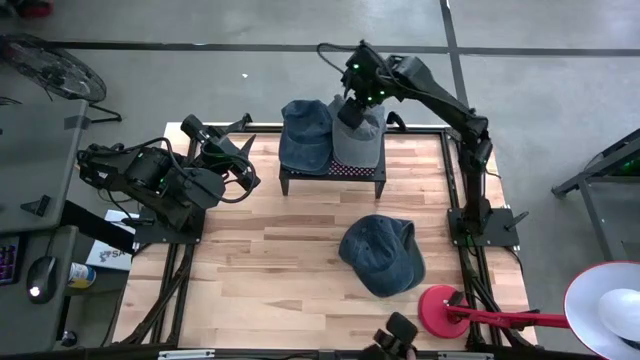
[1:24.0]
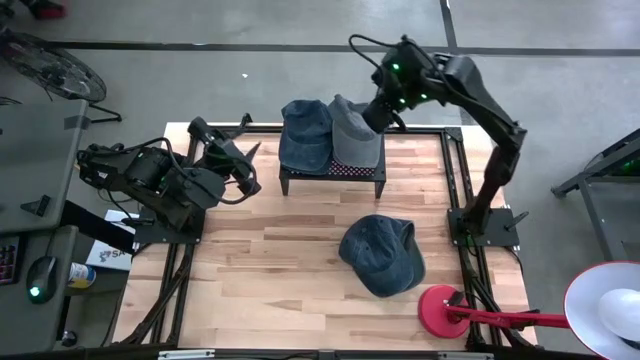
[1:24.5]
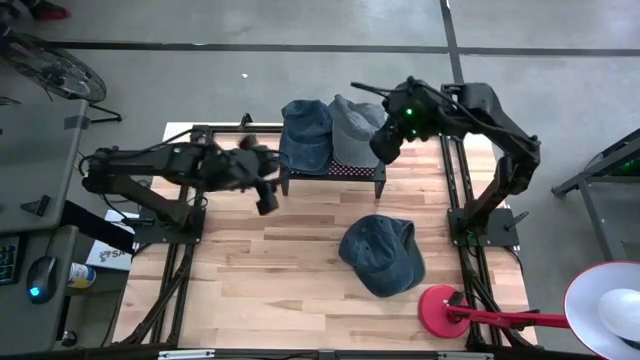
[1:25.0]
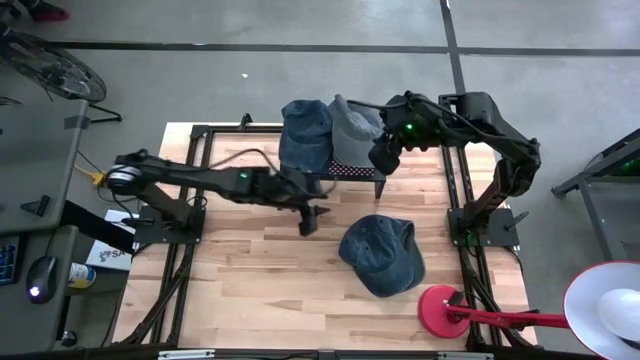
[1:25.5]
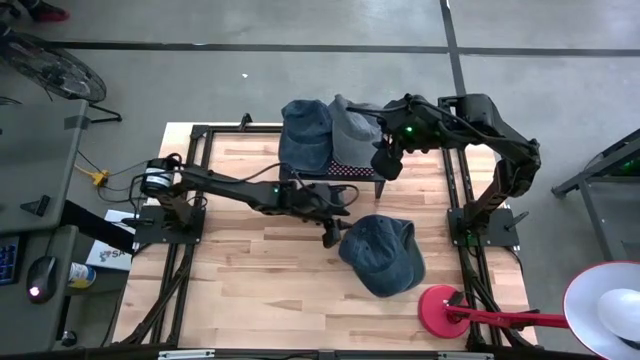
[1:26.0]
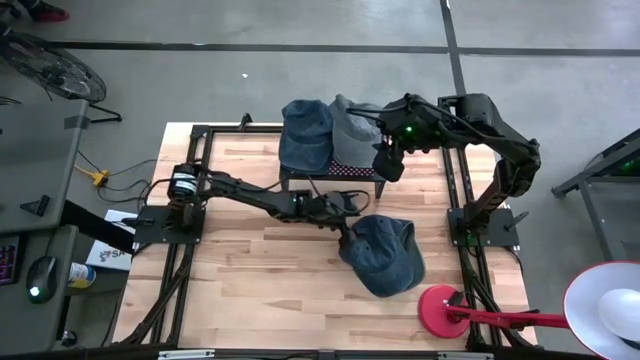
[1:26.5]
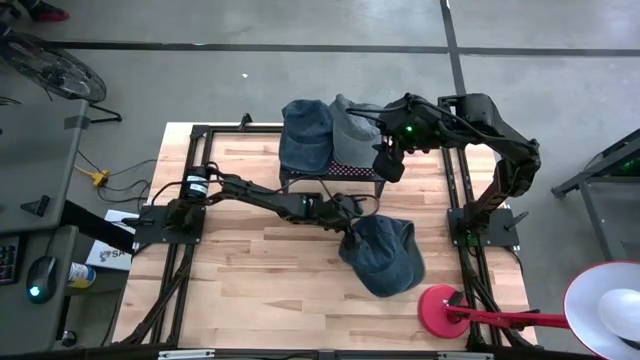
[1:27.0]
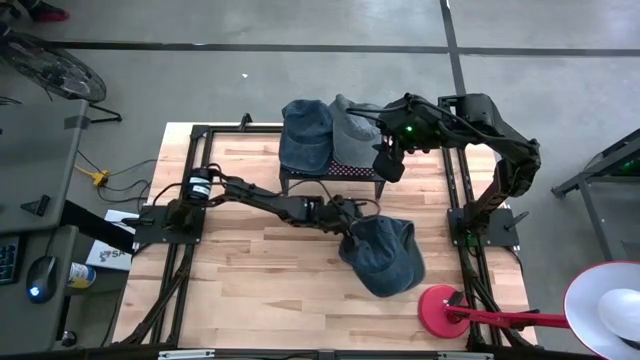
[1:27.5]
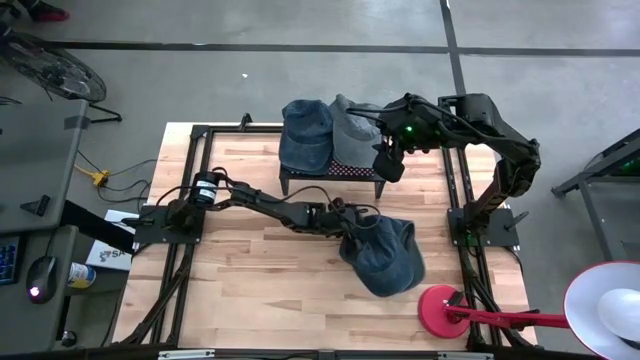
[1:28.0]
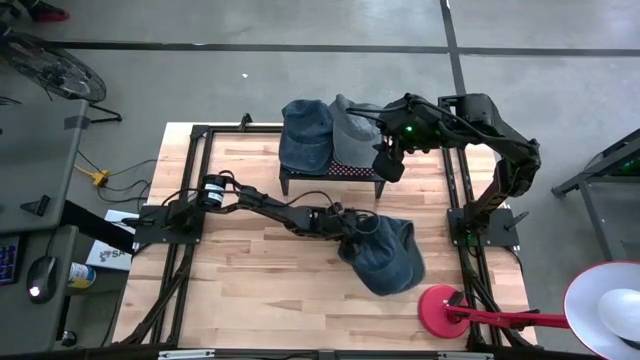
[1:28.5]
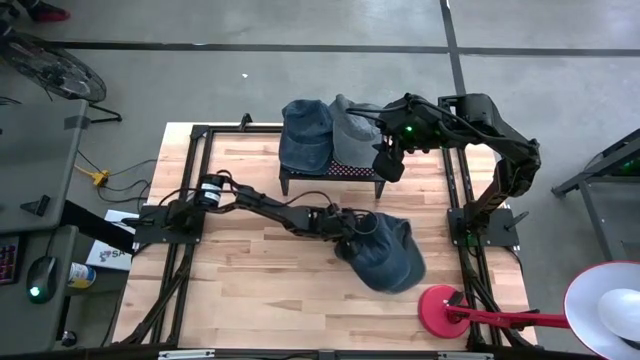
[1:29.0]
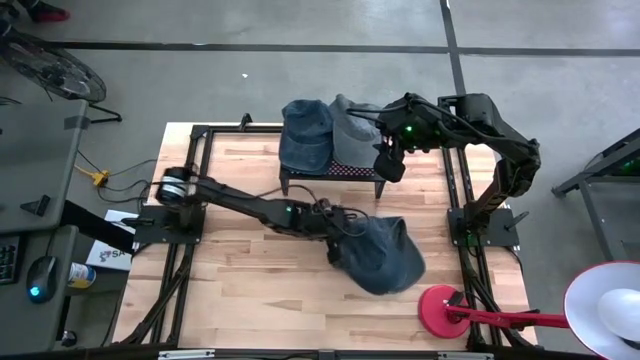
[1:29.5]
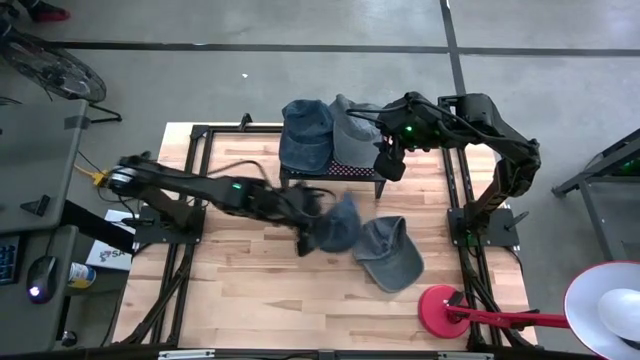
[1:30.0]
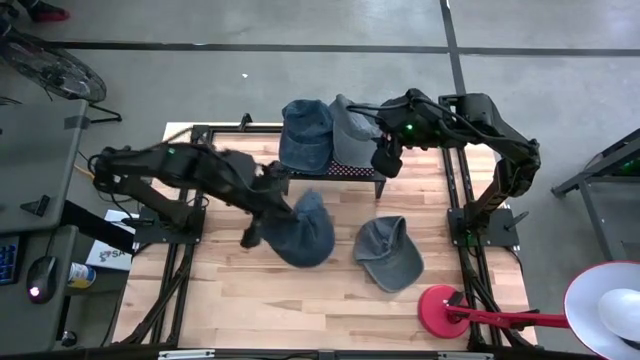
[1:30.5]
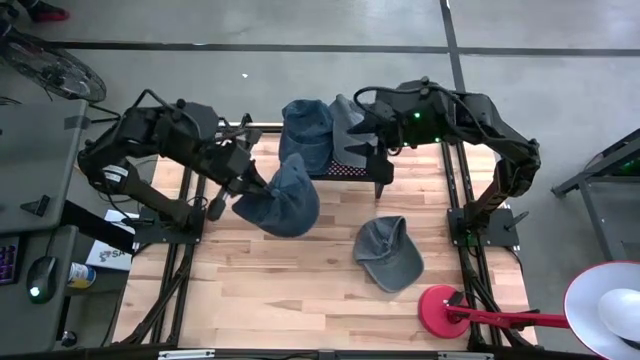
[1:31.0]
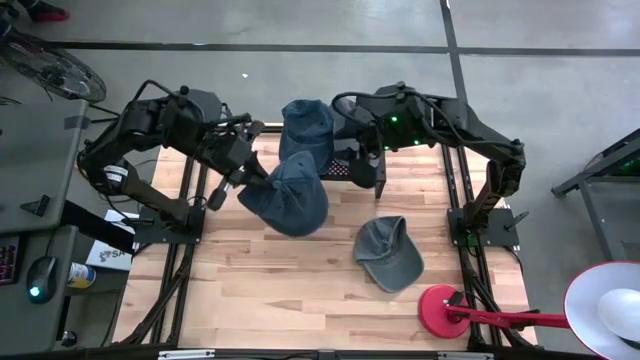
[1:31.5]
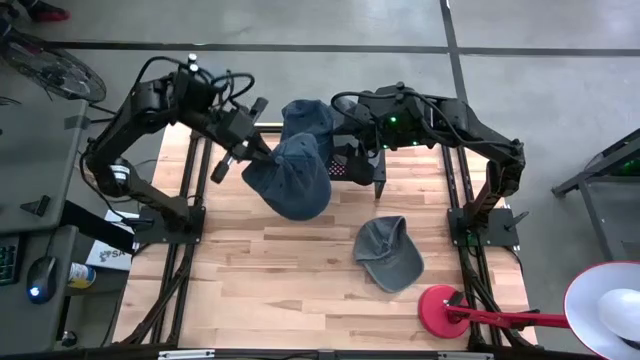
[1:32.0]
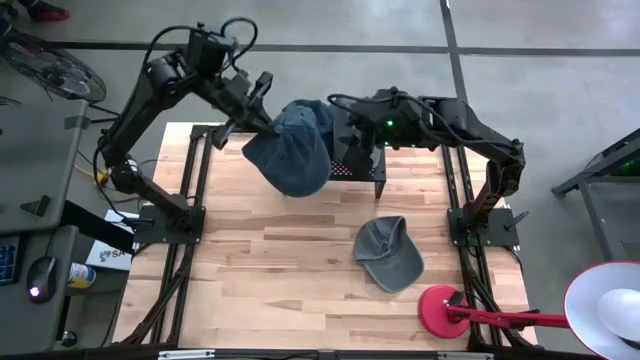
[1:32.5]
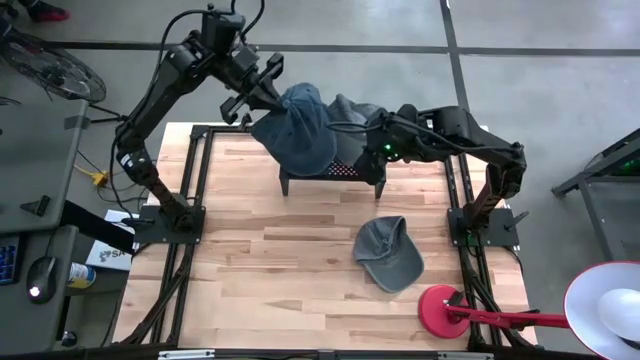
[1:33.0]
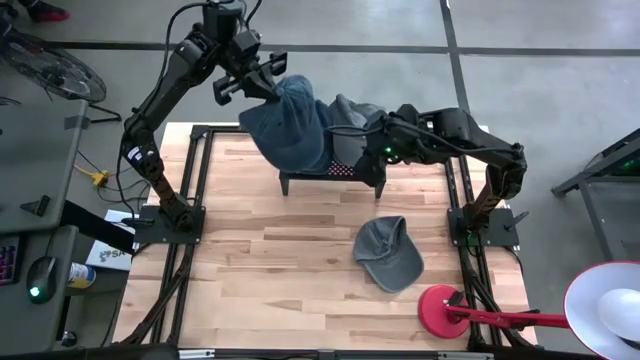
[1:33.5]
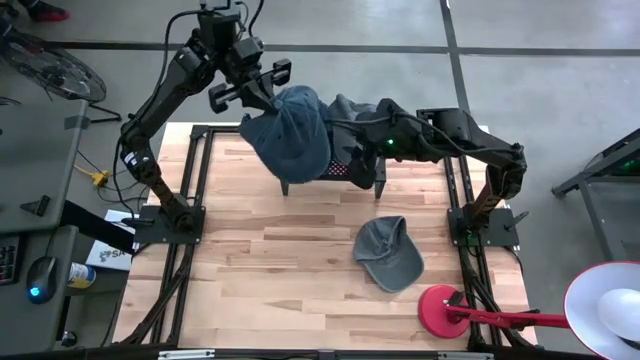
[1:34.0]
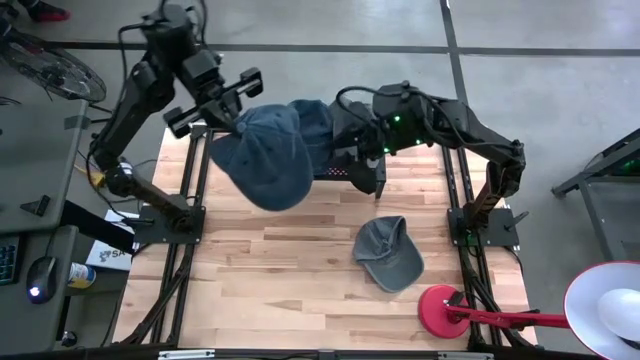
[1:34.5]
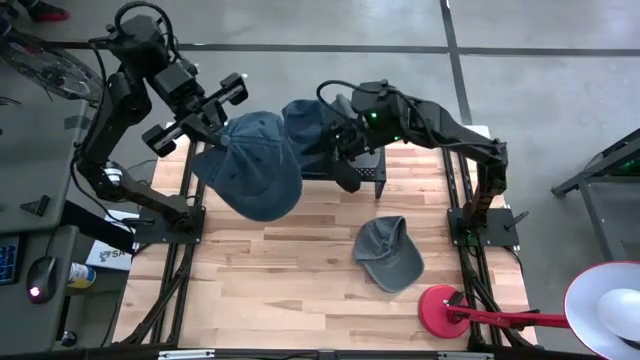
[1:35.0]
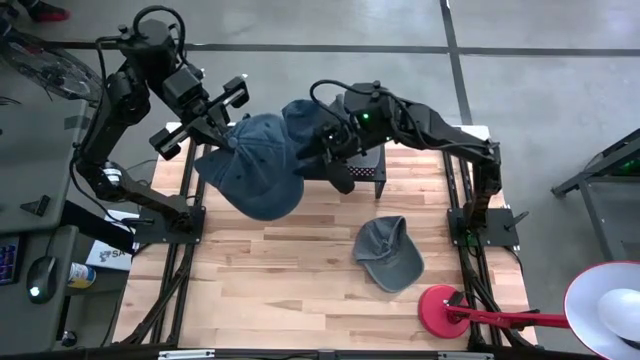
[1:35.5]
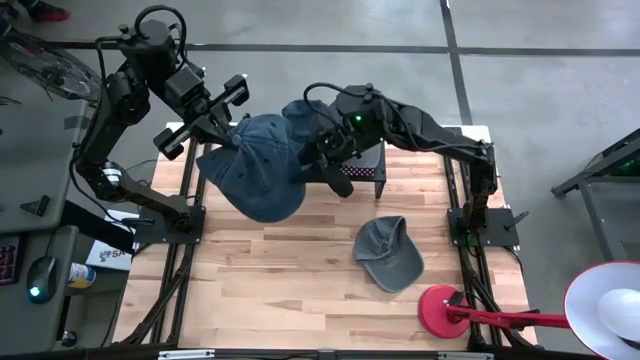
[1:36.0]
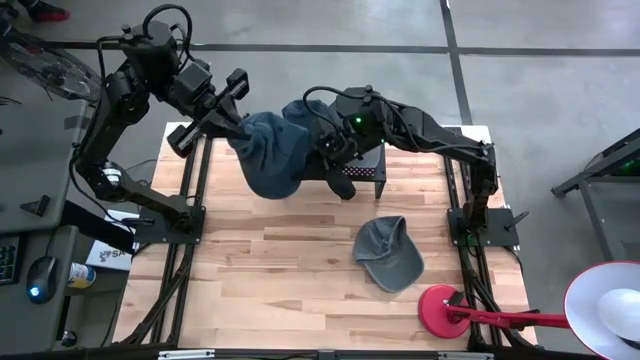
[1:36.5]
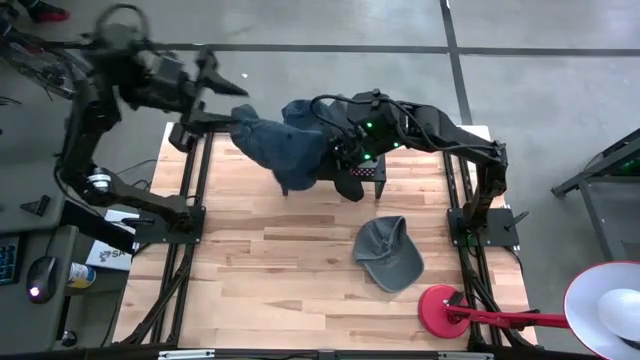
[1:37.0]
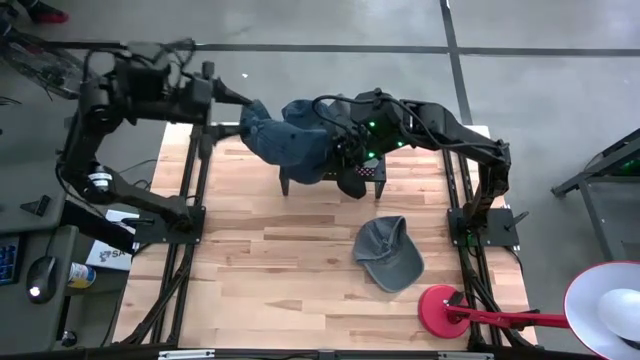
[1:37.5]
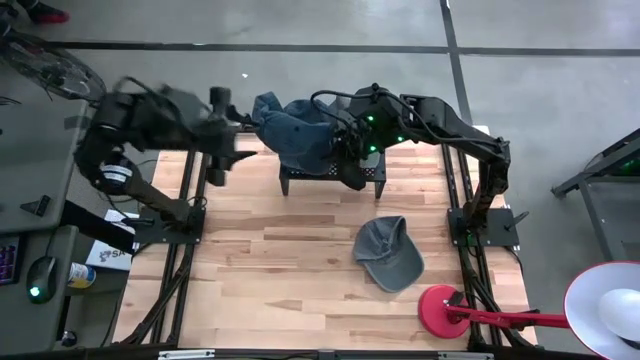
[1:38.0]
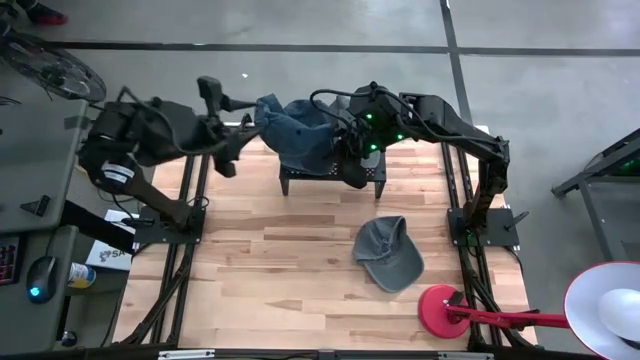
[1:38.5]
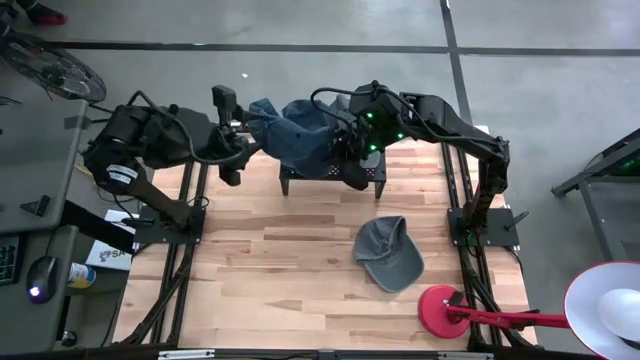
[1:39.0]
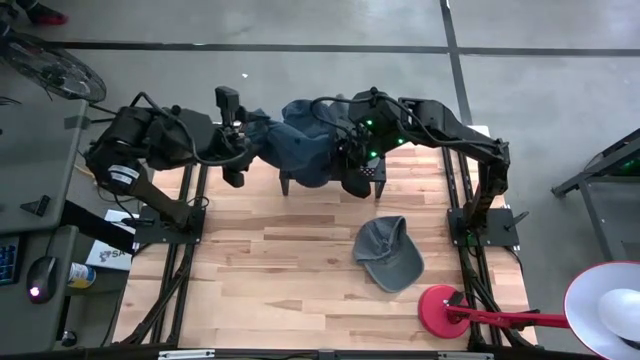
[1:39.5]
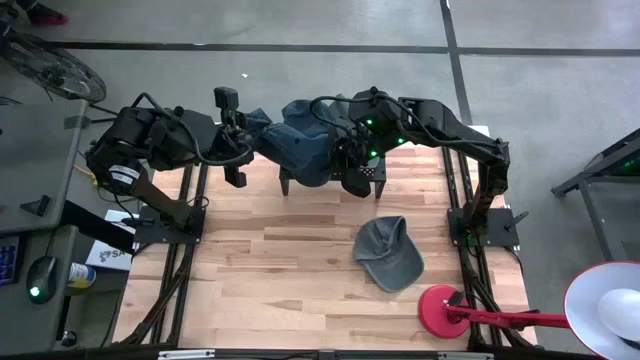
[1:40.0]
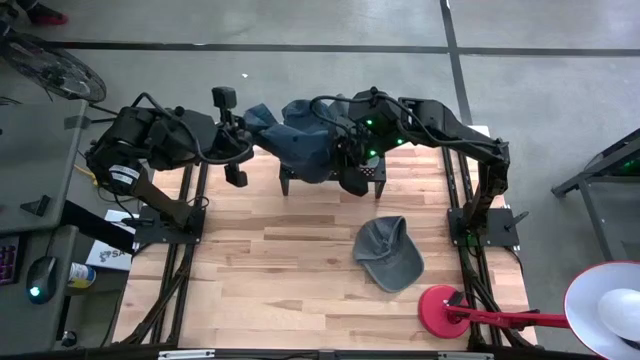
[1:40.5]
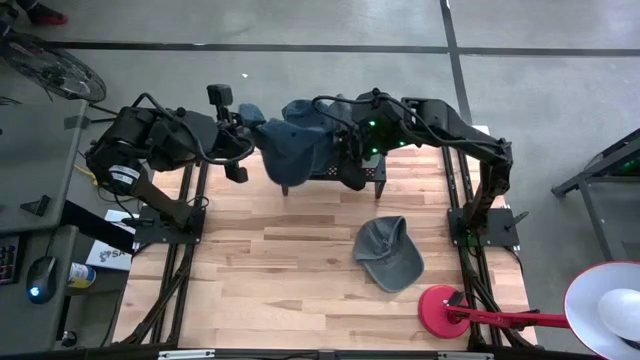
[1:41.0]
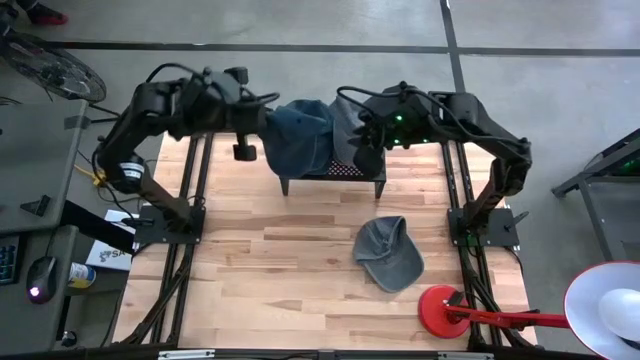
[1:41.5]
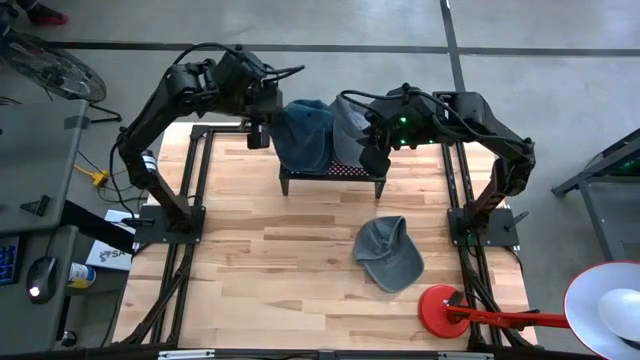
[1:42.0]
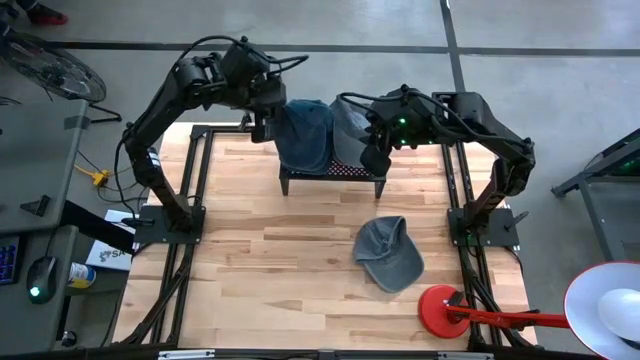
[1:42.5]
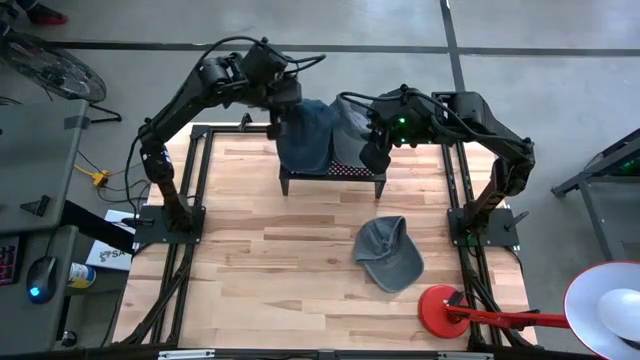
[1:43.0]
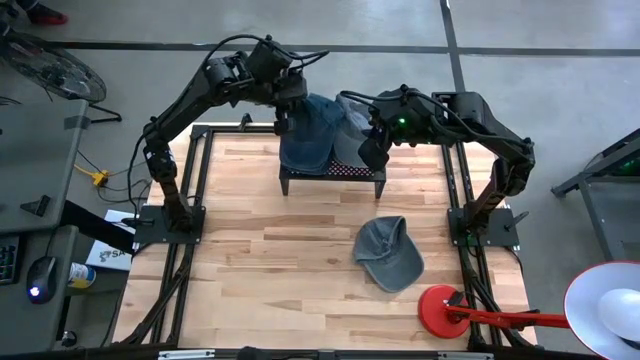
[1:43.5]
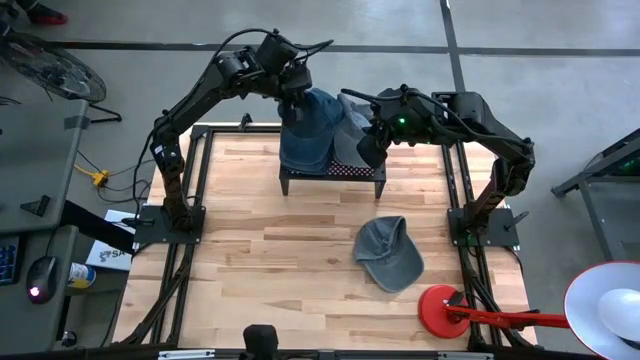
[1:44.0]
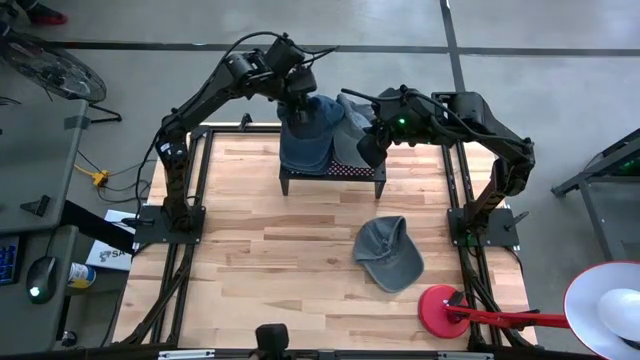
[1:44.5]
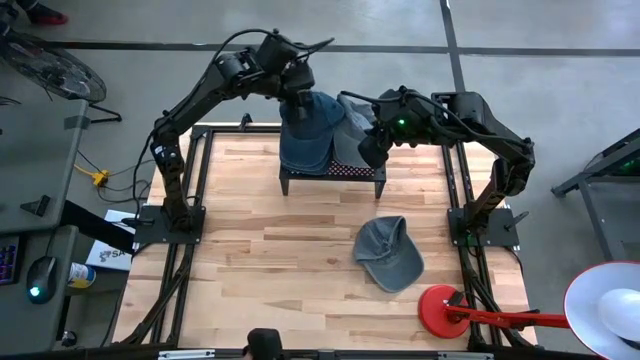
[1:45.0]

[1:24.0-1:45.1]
Task: Pick & Place hat
Stack the blue cap on the blue cap on the shelf

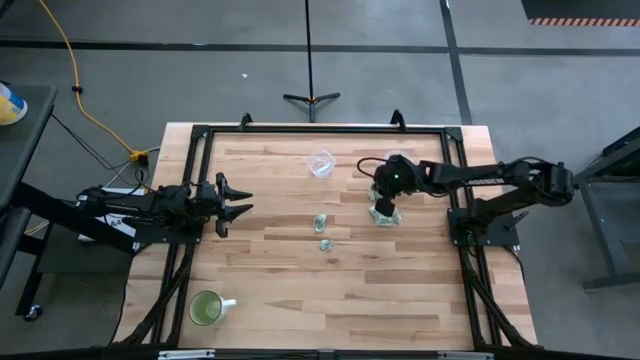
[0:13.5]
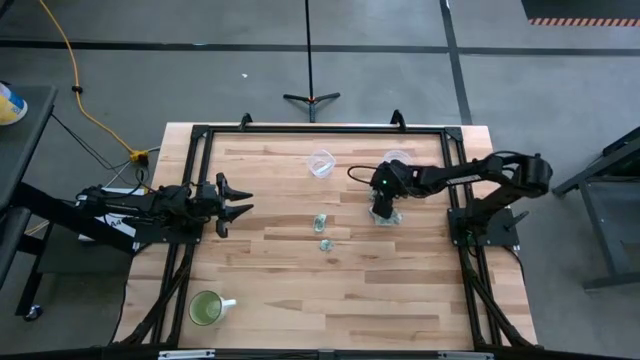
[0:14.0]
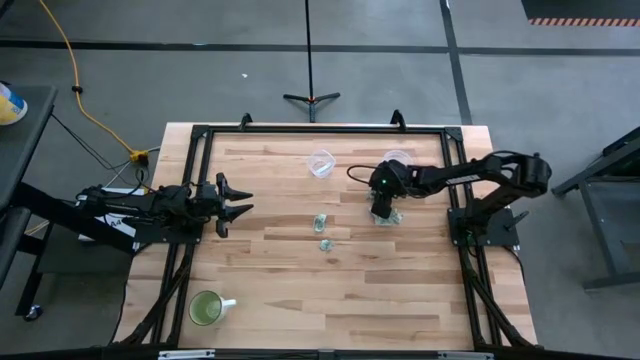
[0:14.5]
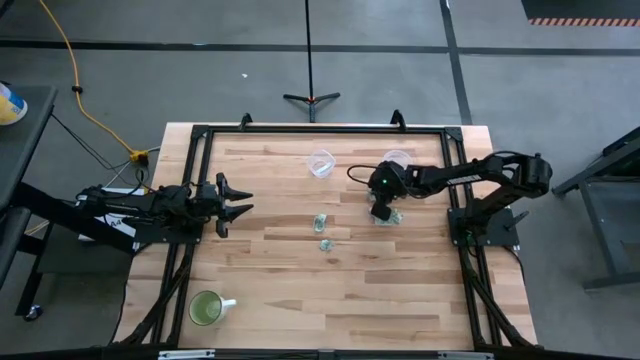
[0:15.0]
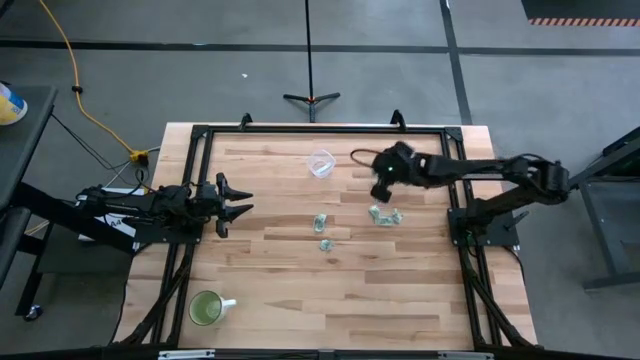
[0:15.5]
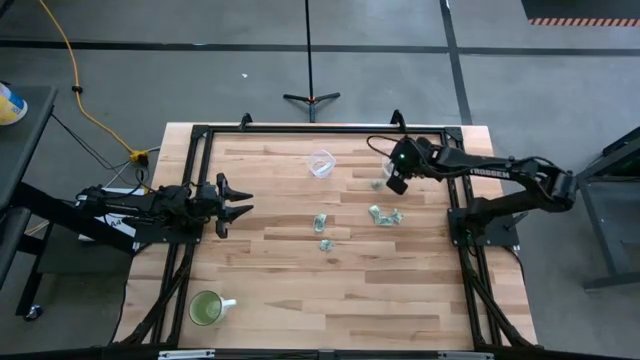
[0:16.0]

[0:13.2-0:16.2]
Task: Pick and place Stevia / Truvia into bins
Put the stevia packet into the right transparent container
